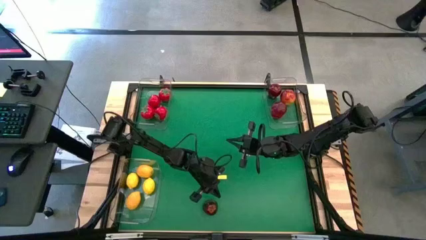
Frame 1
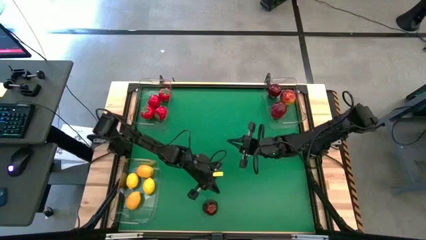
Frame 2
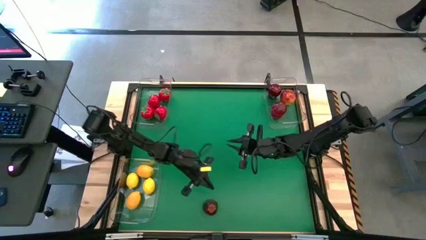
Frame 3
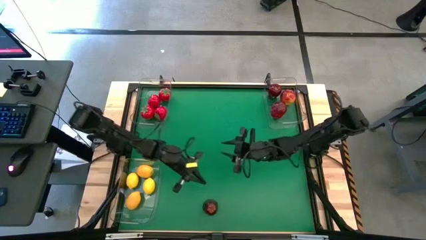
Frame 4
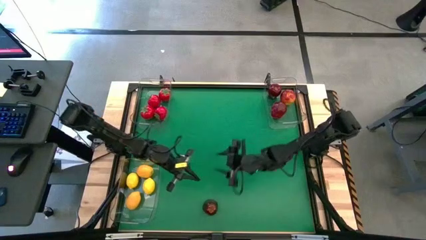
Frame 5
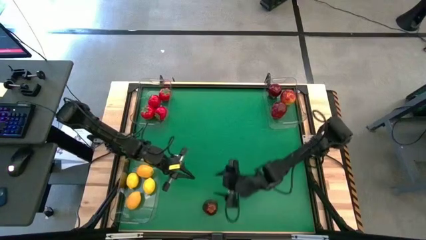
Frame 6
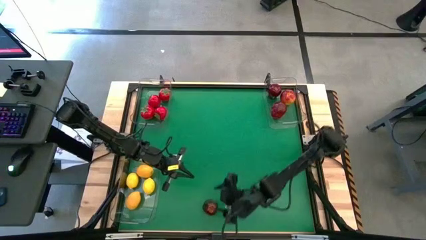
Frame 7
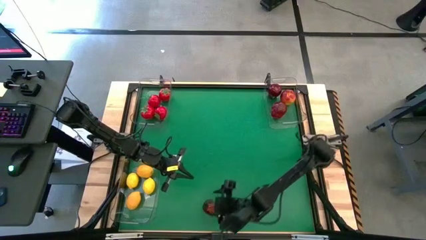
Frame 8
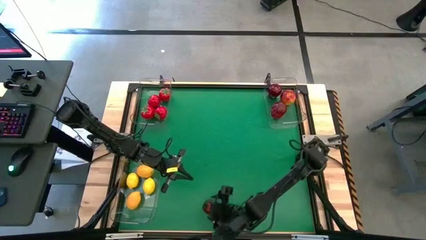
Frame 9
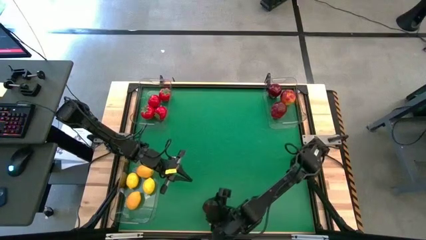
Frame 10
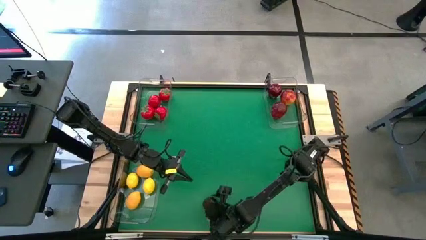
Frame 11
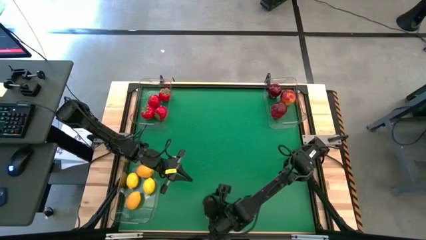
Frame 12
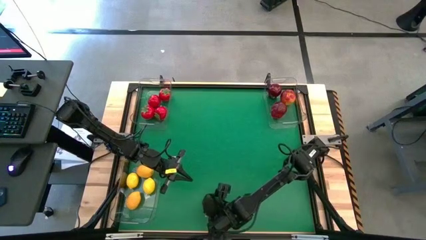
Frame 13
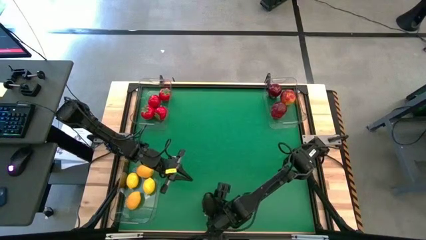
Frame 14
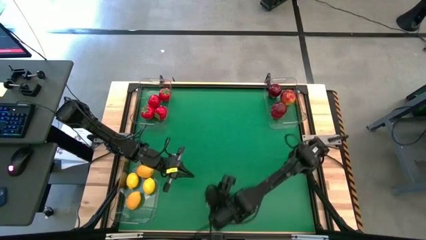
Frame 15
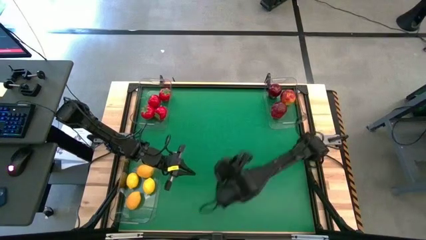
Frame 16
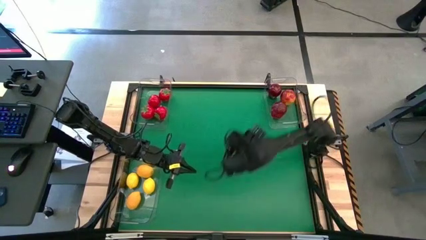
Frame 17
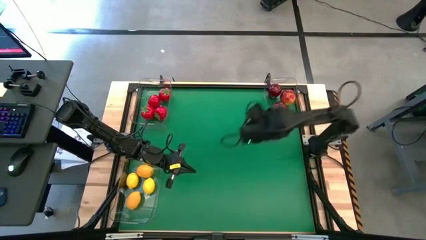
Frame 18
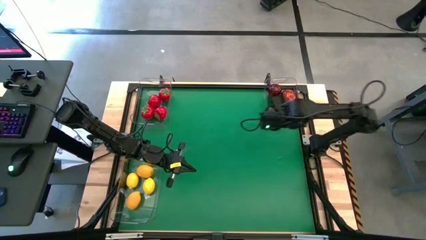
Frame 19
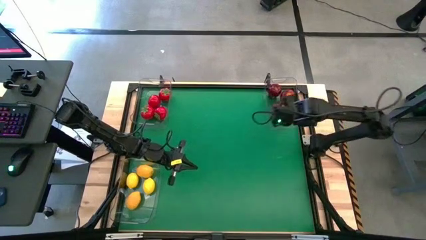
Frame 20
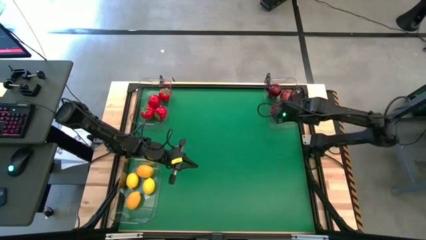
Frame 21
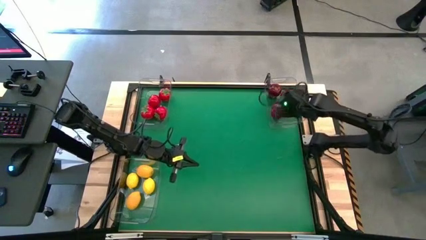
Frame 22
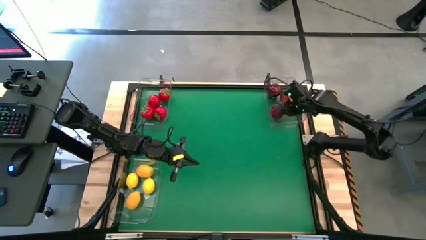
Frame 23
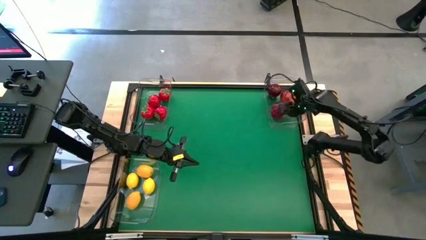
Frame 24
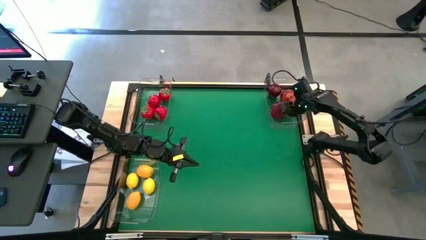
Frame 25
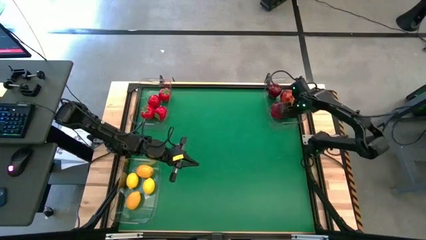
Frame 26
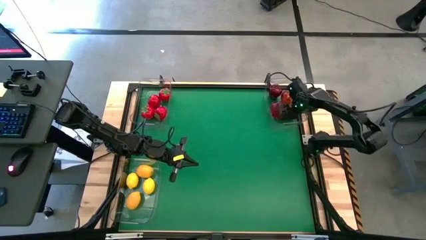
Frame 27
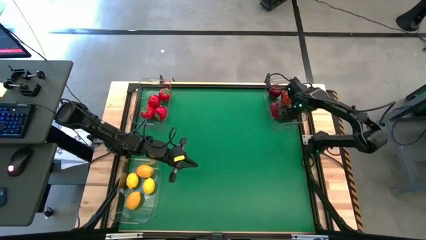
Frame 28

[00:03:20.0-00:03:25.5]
Task: Sort produce into baskets
Put the apple into the top right bin

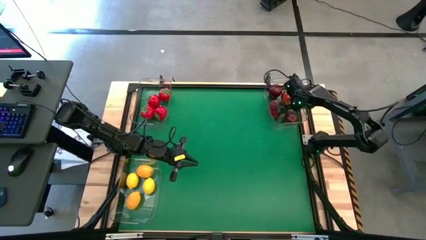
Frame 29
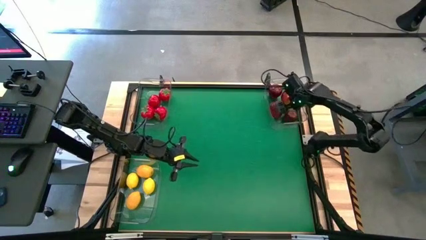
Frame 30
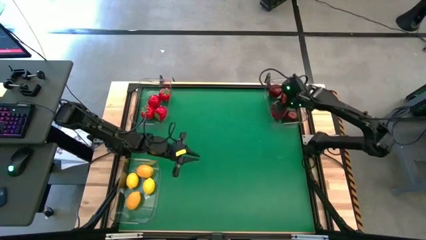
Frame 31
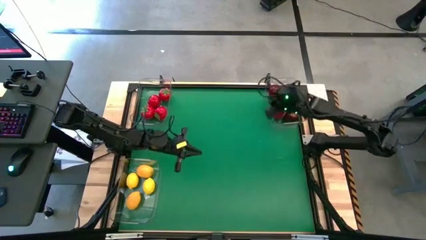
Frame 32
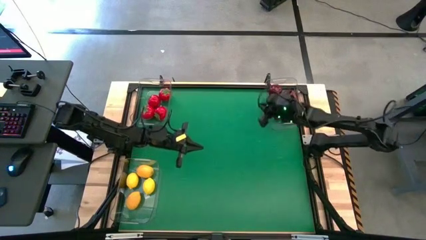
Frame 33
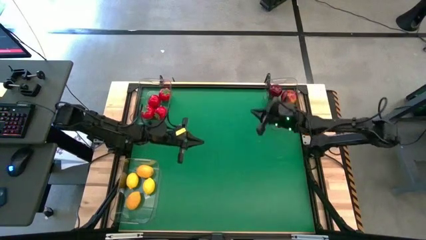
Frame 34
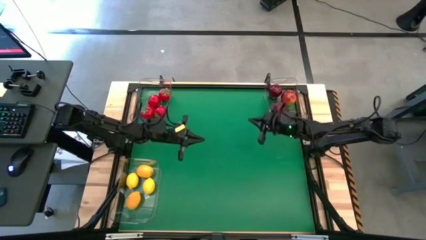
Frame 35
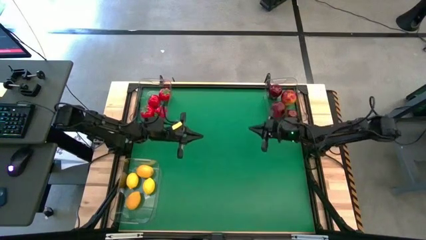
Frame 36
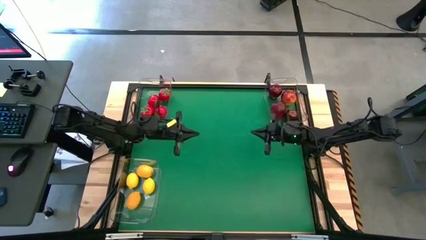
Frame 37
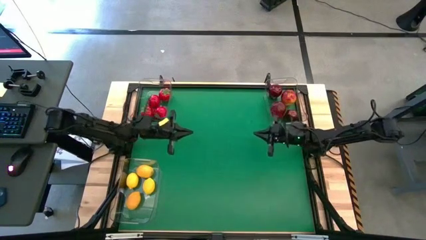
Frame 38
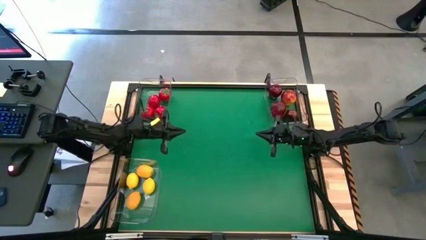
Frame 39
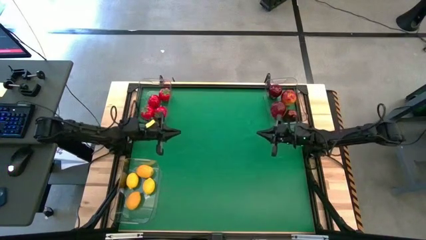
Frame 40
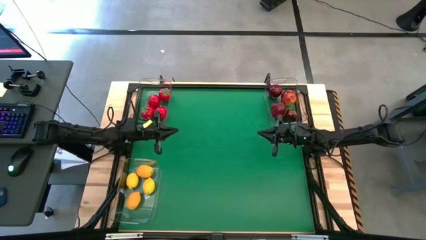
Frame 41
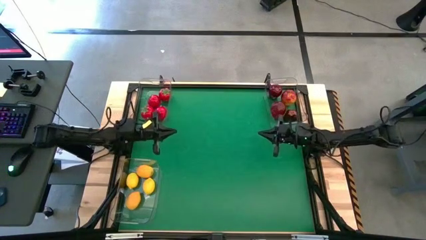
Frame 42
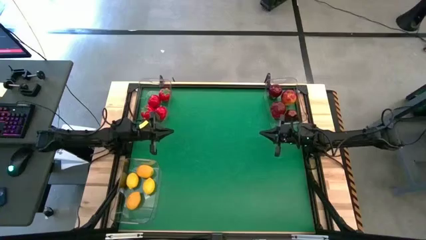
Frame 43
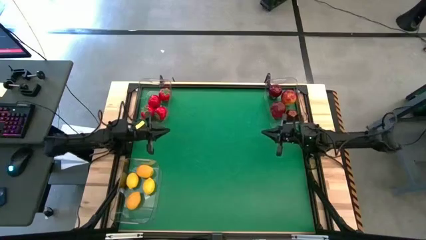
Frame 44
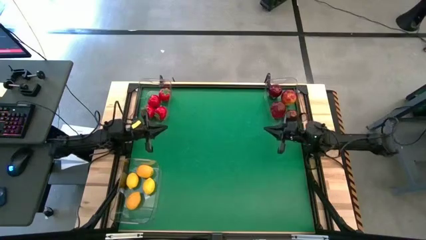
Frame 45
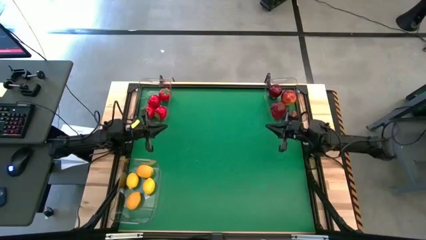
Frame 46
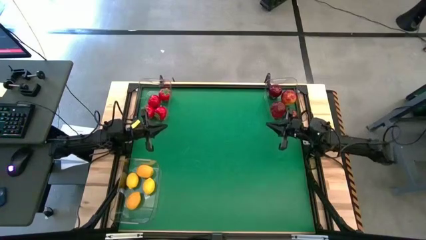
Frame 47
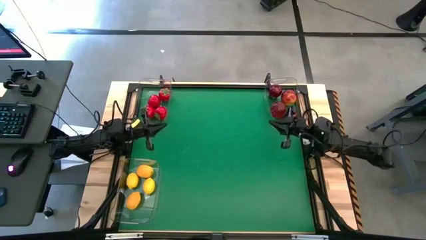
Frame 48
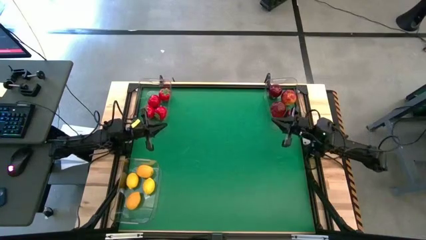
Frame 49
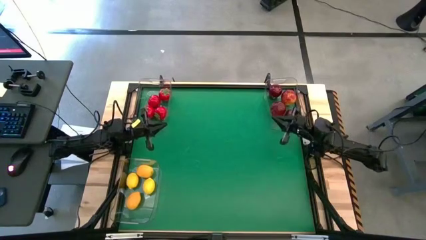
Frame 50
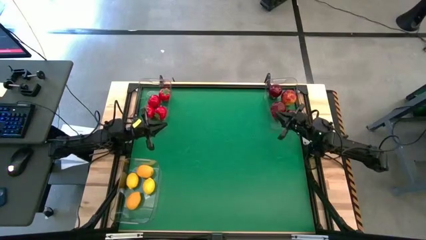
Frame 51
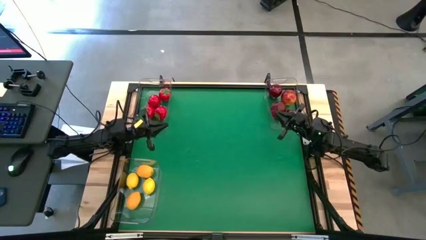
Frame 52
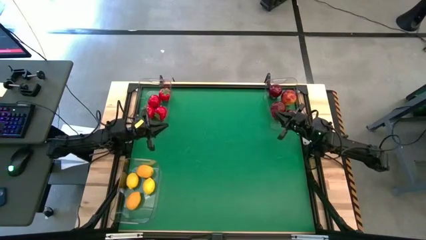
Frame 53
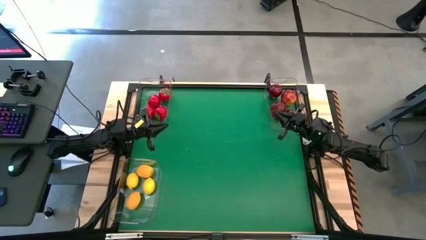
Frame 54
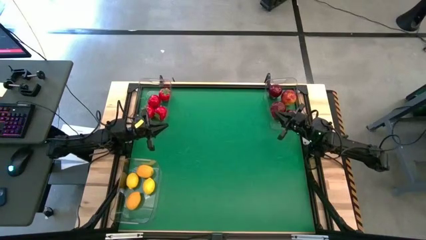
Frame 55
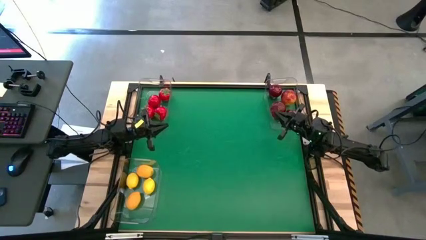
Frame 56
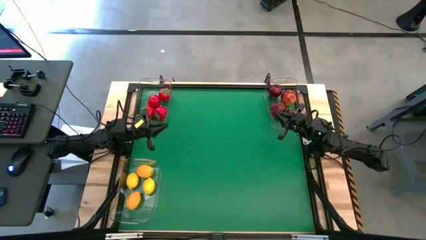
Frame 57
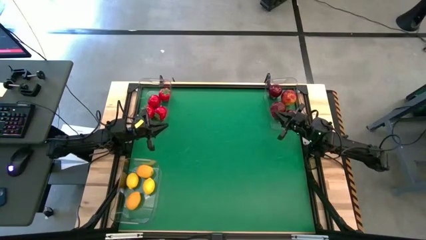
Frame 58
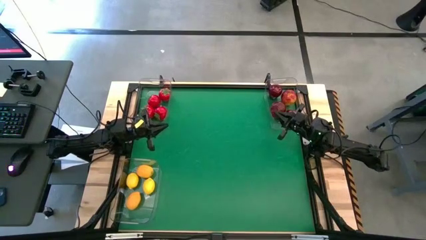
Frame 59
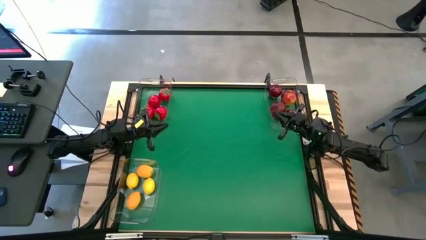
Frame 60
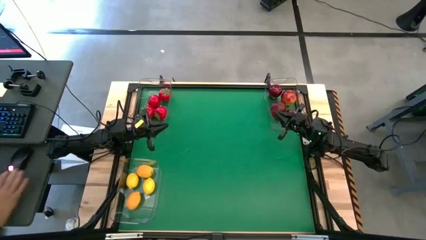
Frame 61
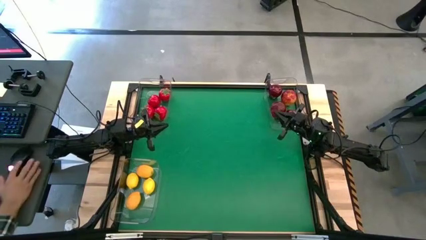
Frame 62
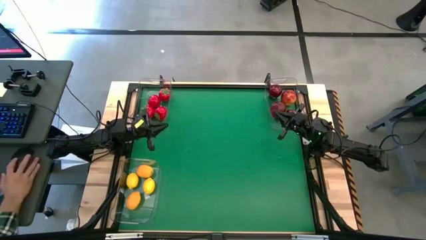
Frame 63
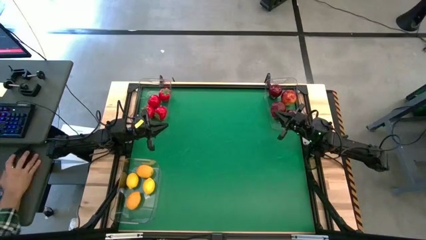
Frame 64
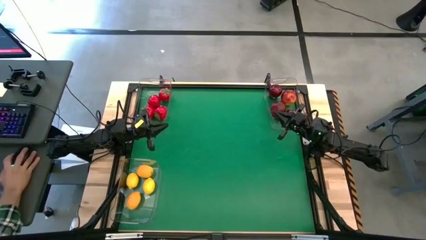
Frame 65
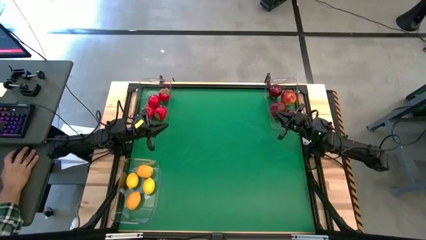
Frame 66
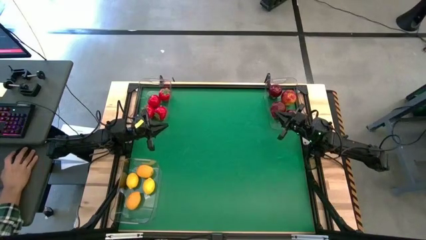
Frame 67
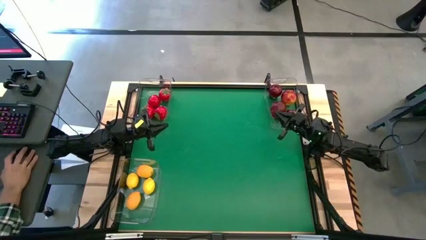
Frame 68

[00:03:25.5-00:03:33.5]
Return to Home Position

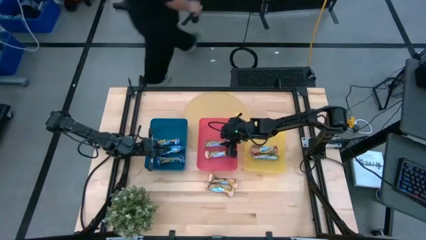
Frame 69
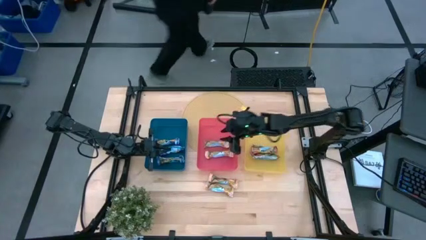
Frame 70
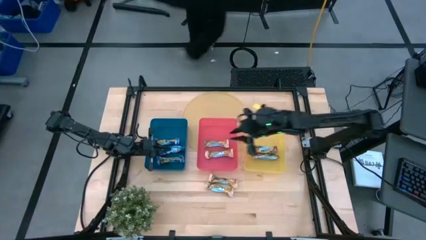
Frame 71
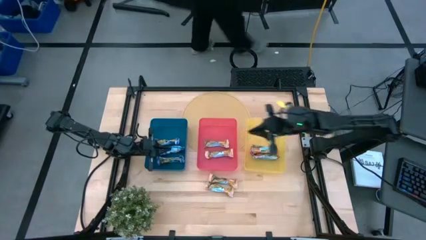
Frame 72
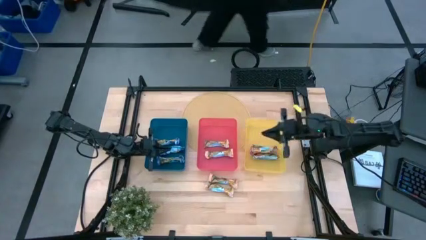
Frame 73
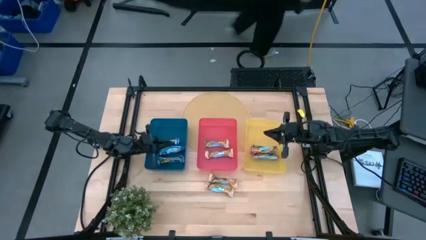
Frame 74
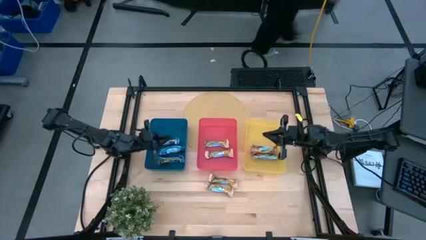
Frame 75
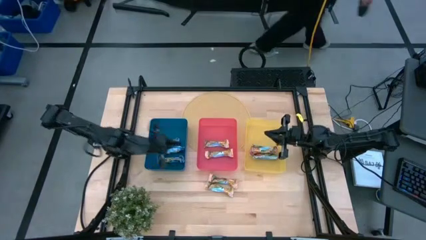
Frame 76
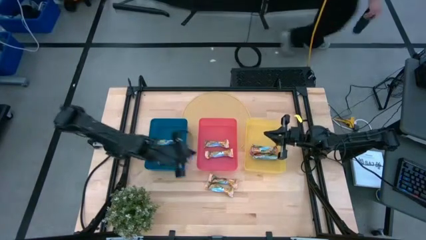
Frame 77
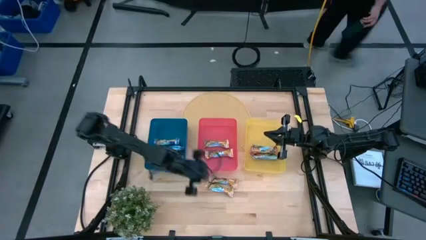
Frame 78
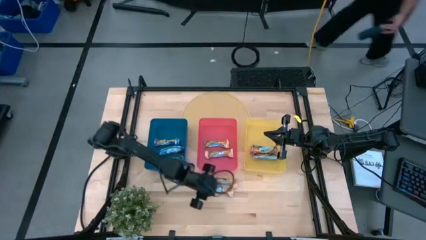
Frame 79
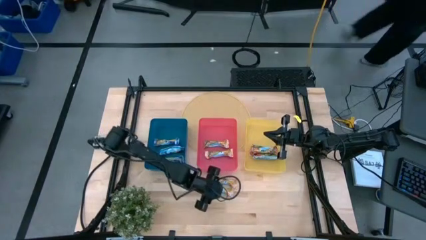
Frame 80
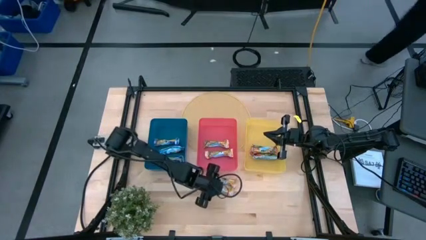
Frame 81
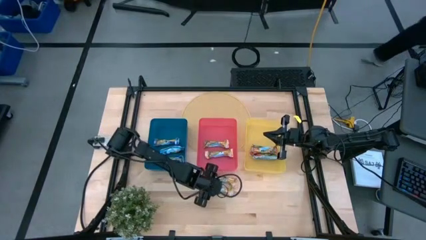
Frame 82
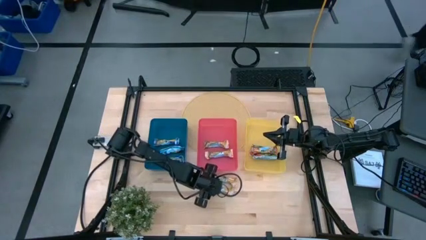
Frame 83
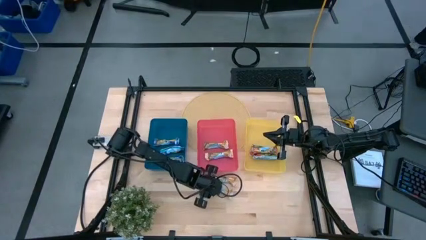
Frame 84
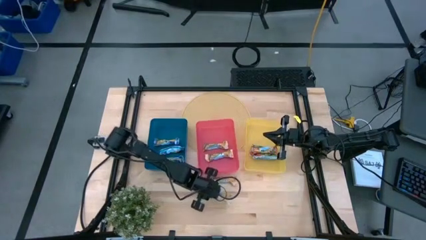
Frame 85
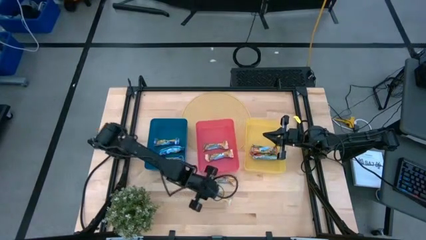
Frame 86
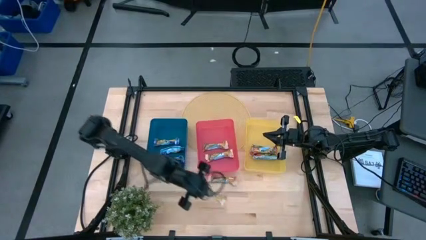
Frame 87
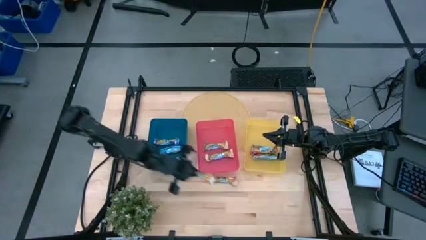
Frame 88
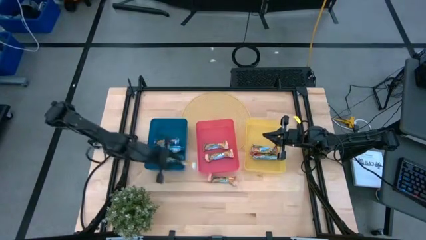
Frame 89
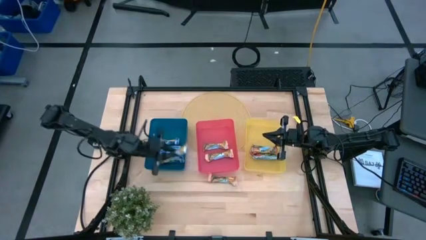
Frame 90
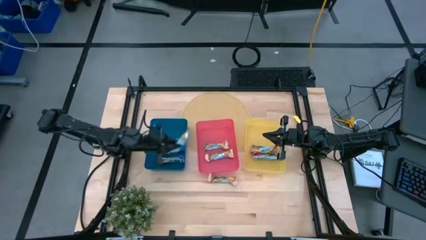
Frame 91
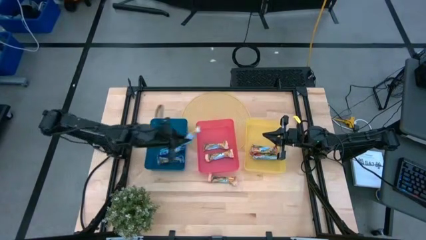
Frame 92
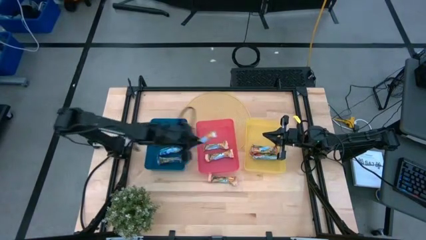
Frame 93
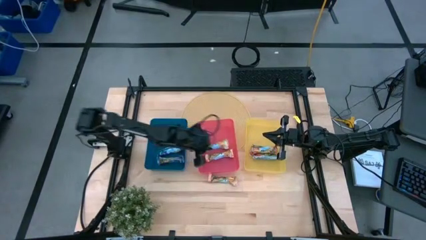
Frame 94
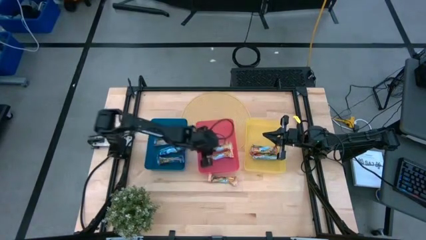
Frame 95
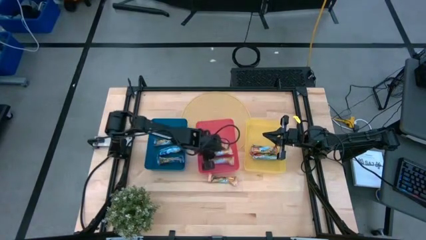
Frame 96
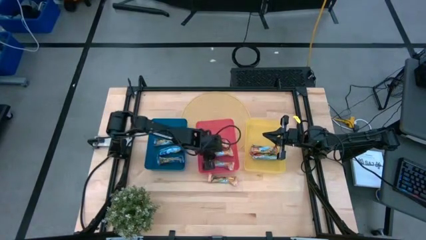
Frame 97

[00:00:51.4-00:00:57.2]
Task: Pick and place Granola Bars by type
Put the bottom yellow granola bar into pink bin
